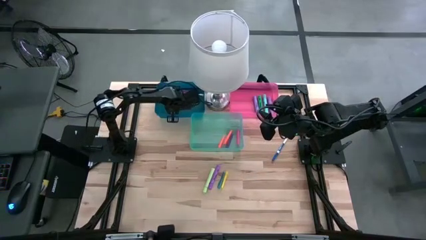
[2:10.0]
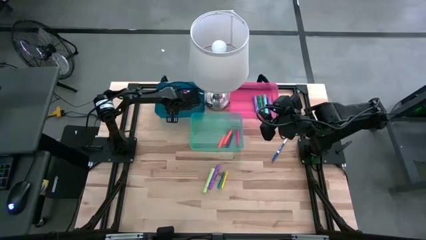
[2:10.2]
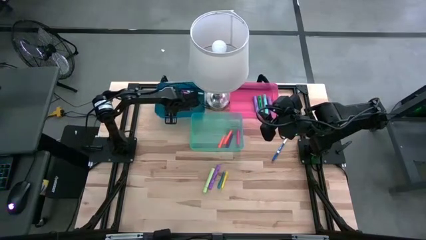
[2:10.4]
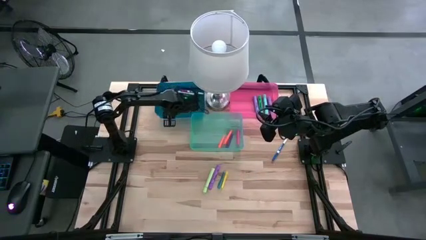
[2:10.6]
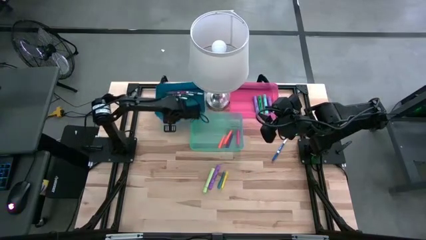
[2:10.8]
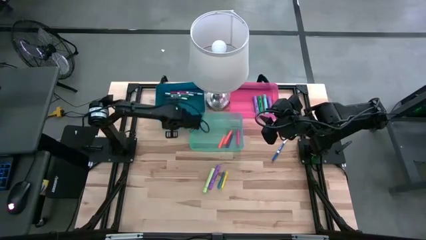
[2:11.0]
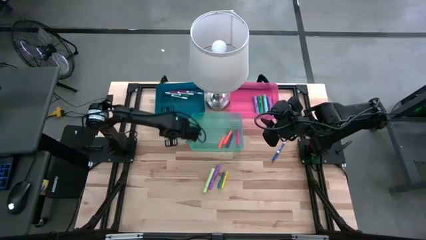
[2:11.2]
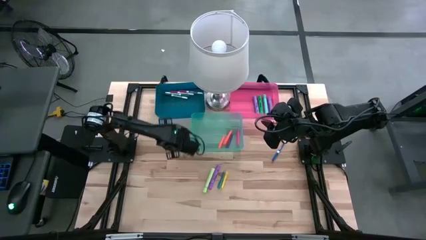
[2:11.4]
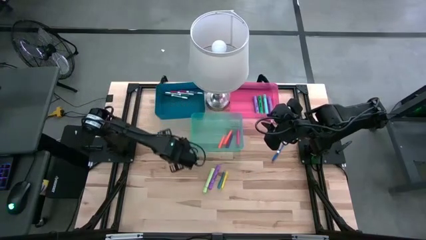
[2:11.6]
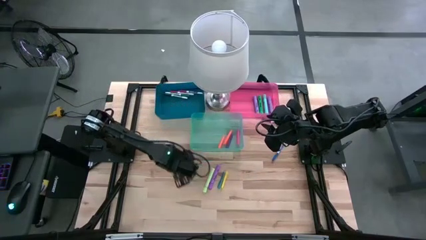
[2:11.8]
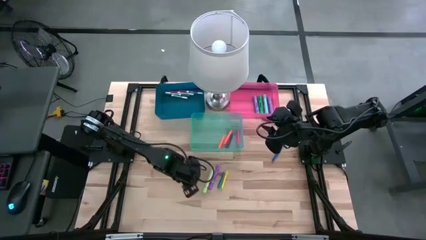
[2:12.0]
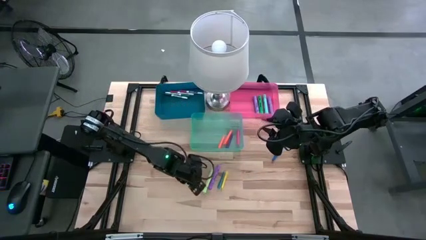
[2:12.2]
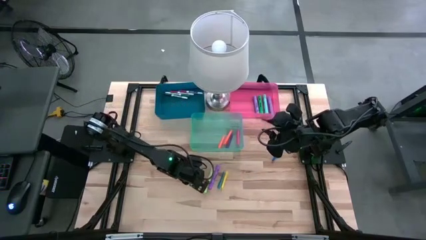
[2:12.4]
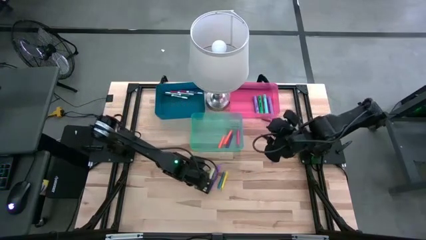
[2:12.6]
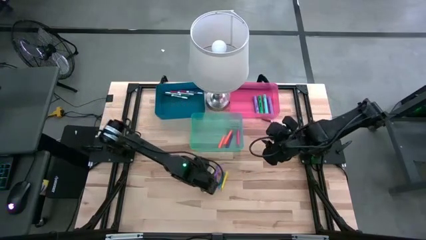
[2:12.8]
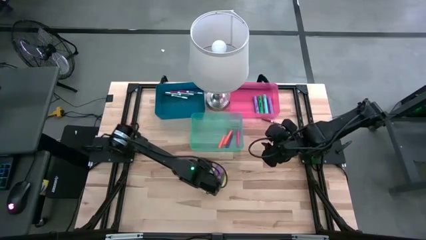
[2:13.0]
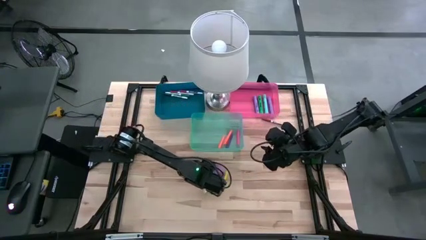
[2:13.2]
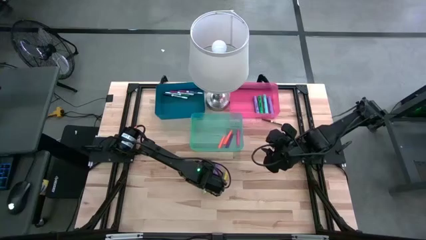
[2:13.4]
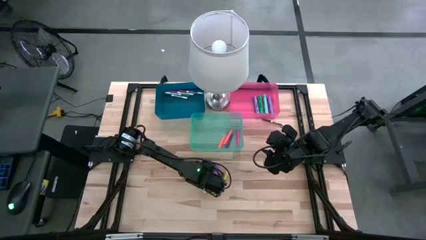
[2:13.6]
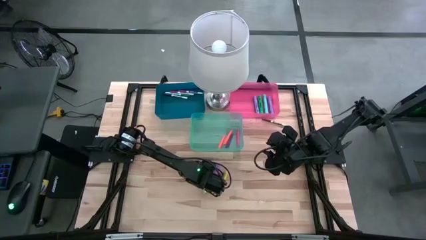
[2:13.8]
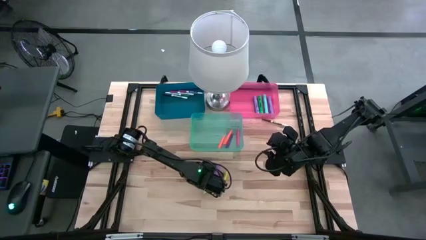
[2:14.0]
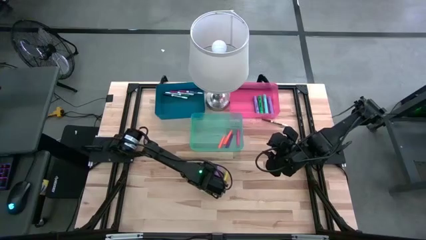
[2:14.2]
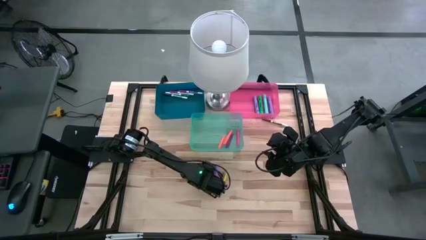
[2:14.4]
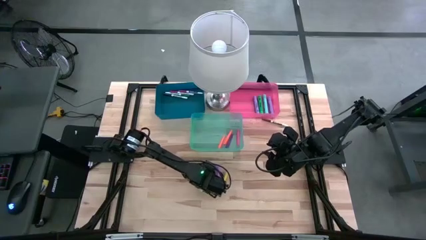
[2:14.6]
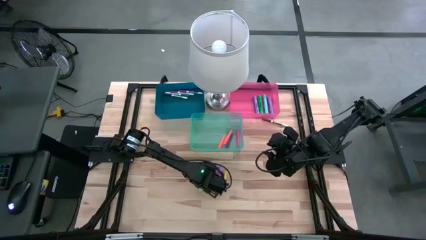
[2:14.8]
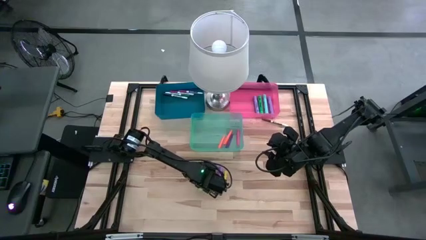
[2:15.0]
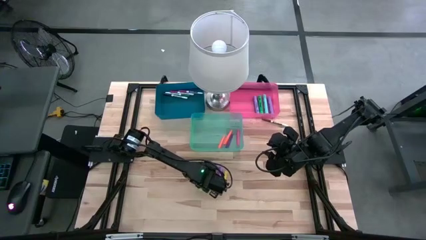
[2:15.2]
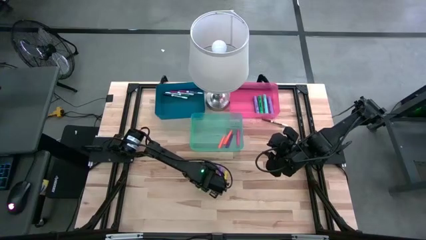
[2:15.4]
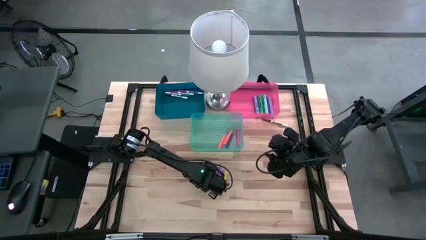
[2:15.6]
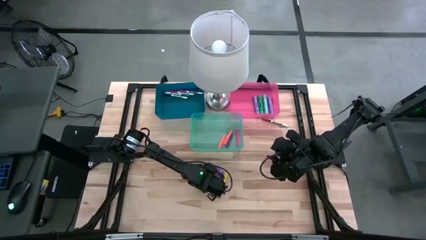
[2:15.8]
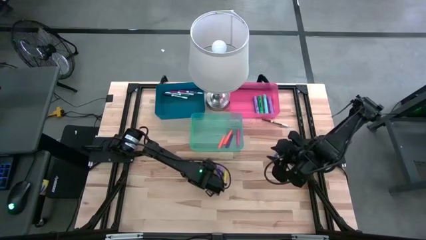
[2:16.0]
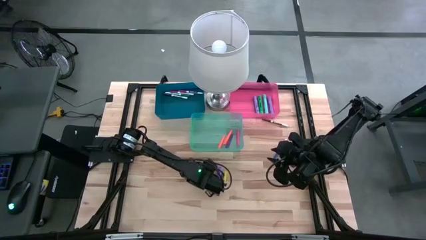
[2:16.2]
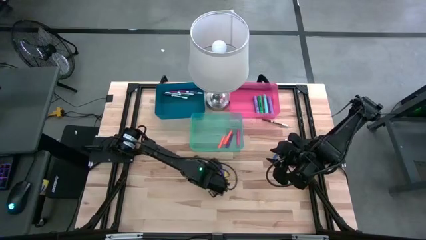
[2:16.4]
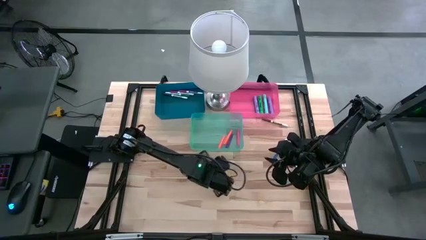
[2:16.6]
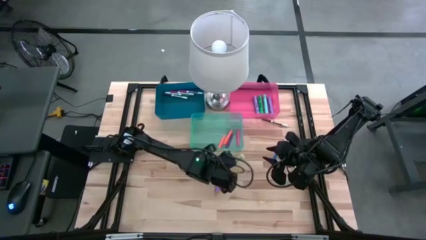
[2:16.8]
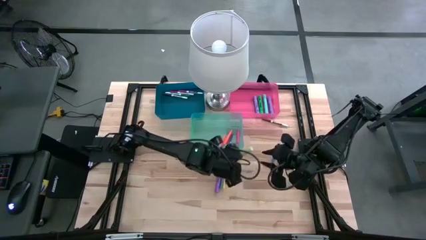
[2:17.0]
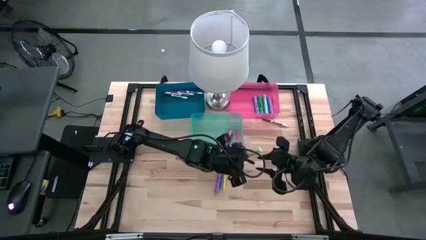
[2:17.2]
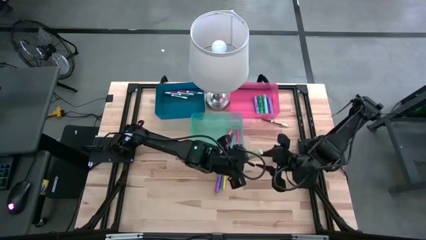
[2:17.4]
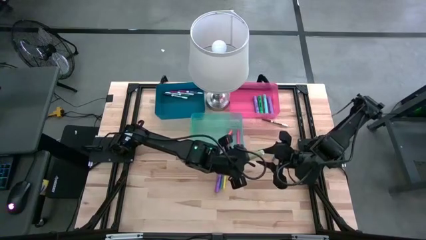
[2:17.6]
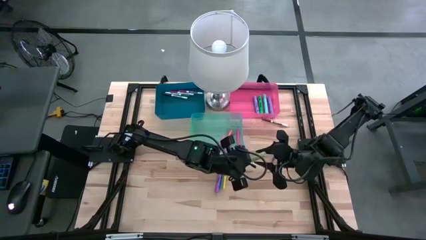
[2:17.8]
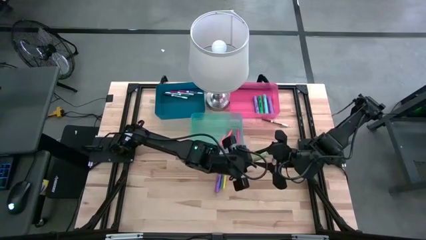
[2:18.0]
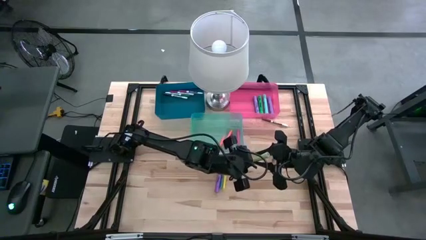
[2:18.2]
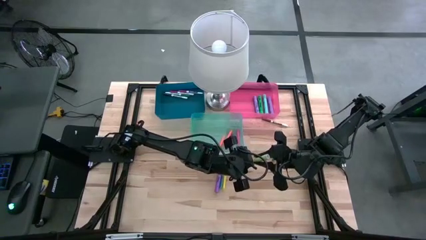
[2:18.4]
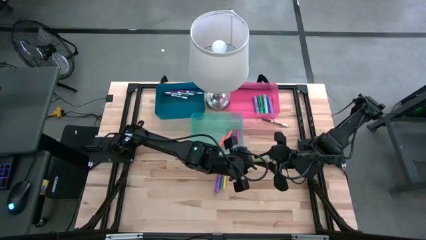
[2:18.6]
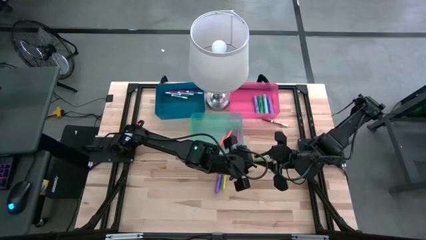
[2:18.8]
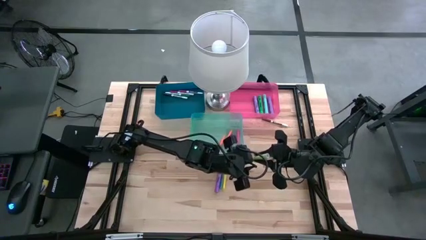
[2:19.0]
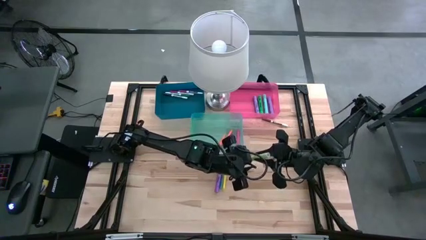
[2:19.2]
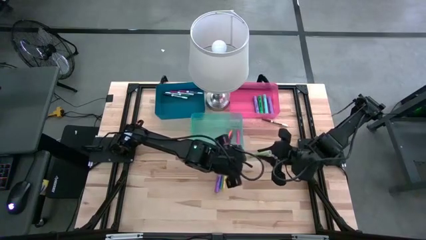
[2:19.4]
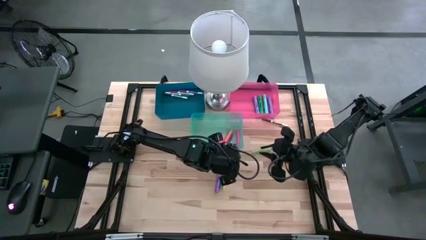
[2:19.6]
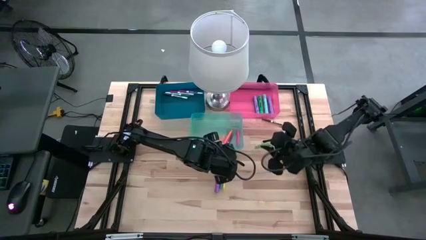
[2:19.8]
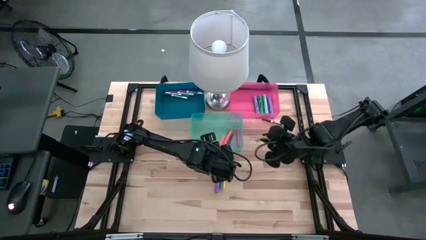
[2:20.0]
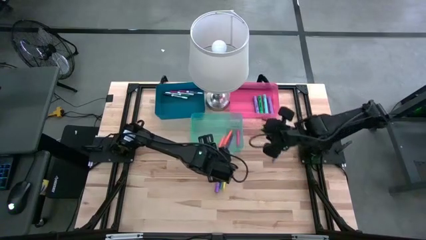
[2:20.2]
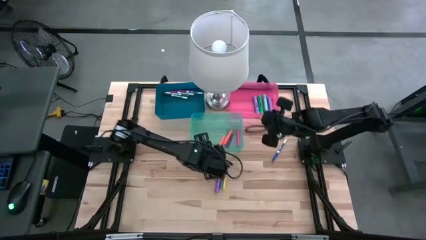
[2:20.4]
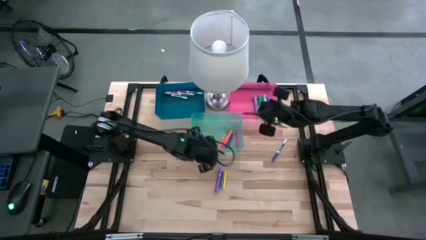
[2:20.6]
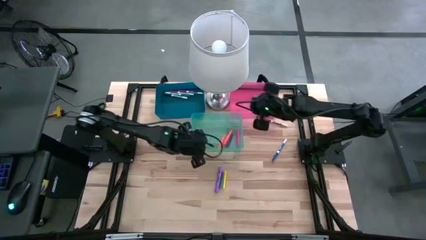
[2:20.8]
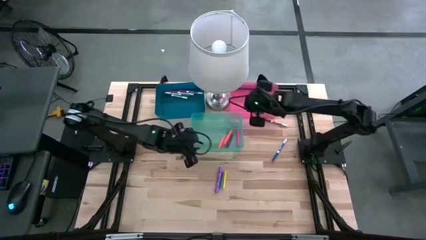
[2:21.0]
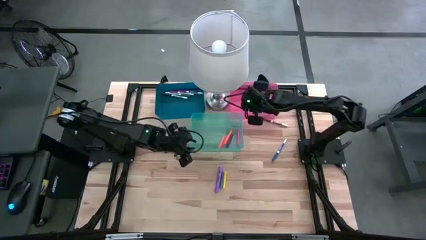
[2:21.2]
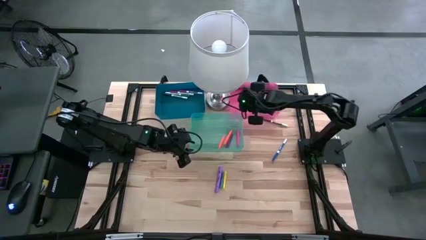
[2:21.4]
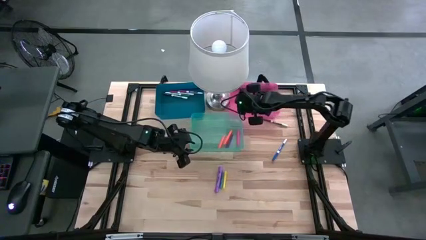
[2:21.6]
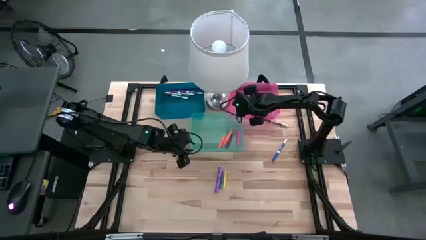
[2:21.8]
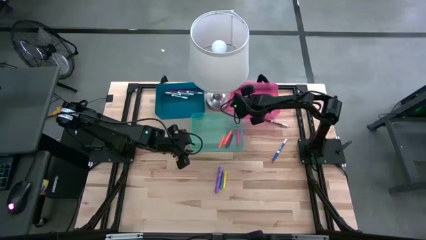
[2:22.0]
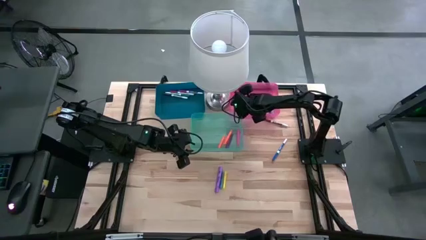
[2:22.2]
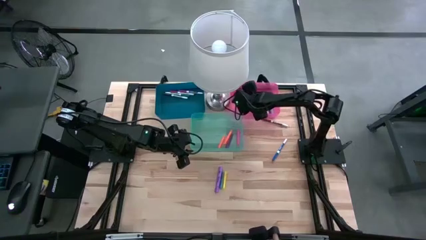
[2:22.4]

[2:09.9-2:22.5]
Task: Pick & Place Markers
Put the light green highlighter pen into the red bin

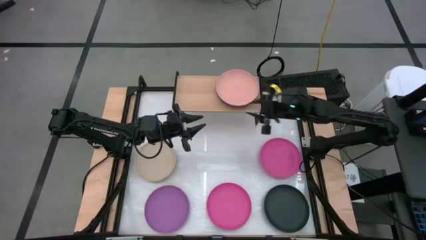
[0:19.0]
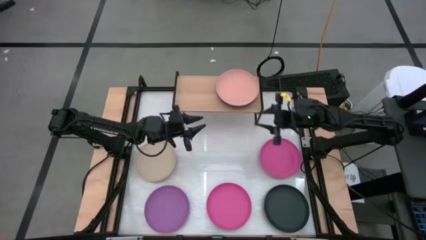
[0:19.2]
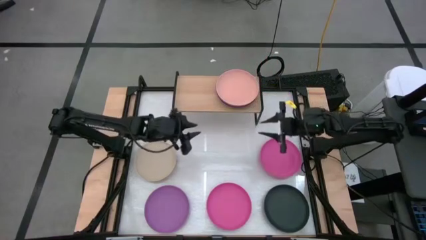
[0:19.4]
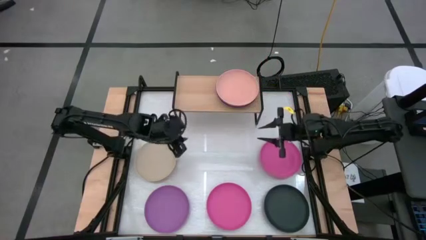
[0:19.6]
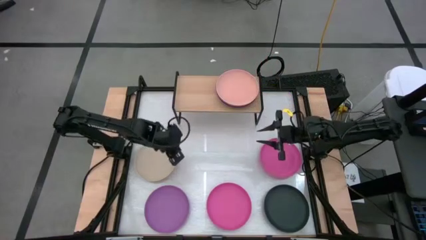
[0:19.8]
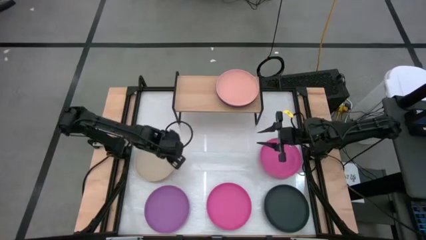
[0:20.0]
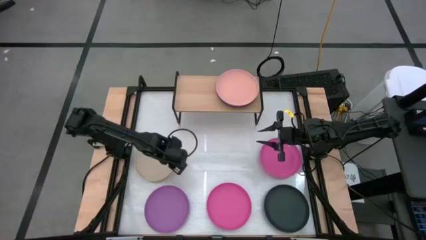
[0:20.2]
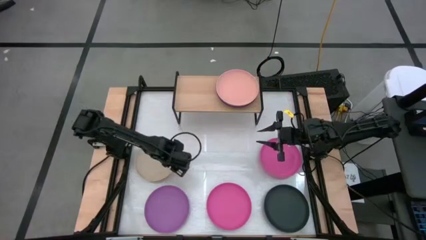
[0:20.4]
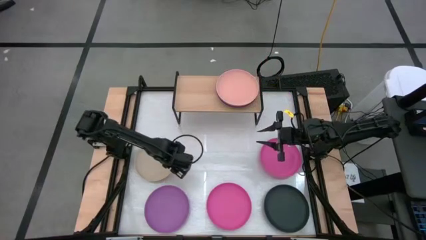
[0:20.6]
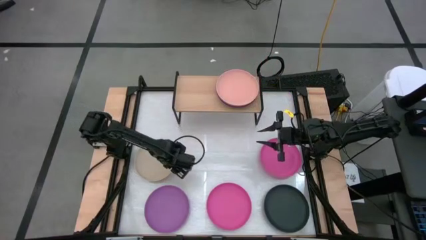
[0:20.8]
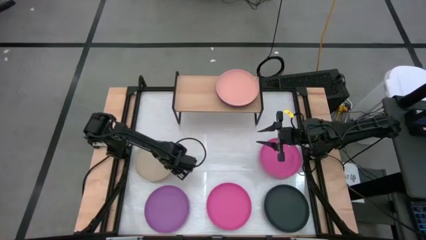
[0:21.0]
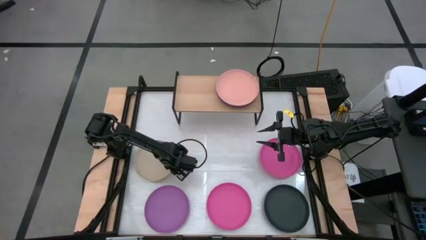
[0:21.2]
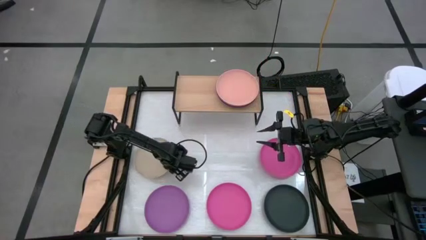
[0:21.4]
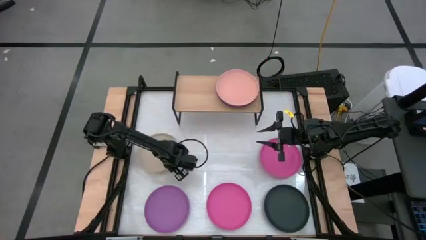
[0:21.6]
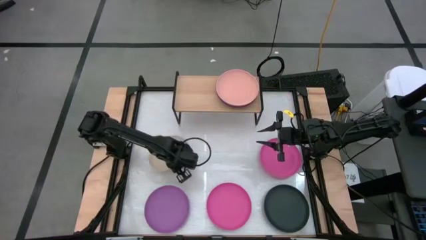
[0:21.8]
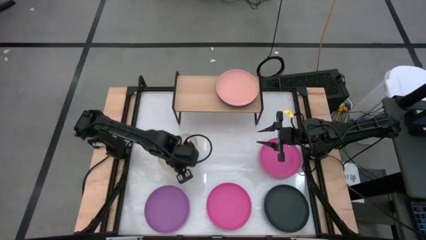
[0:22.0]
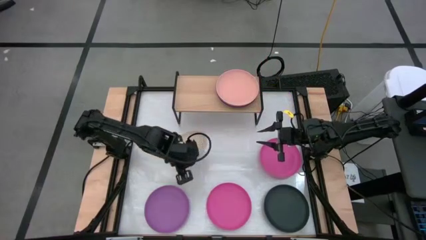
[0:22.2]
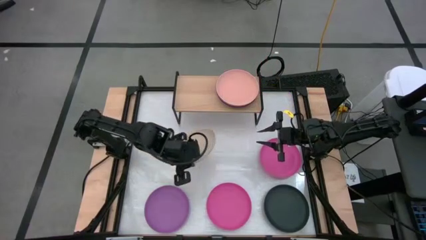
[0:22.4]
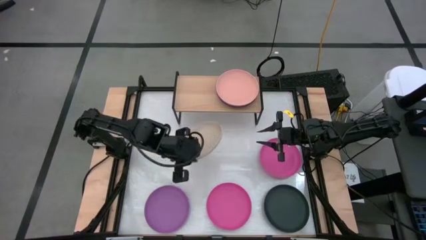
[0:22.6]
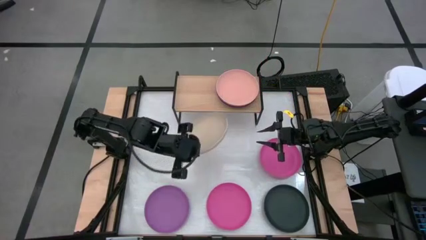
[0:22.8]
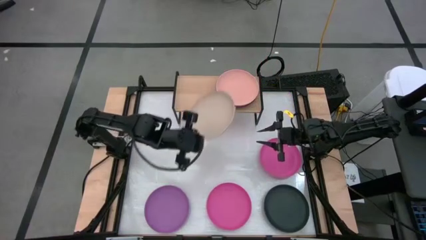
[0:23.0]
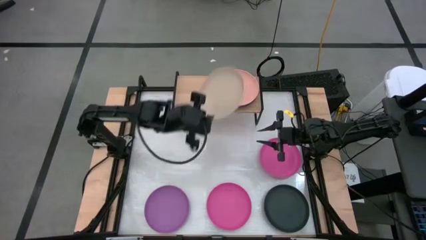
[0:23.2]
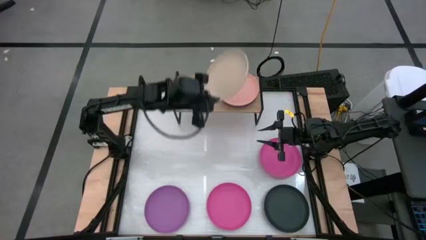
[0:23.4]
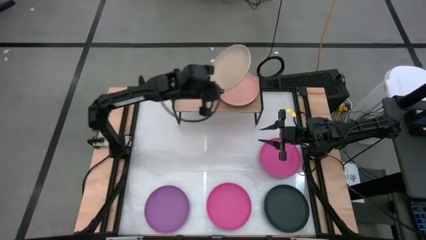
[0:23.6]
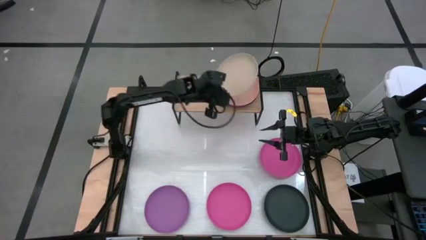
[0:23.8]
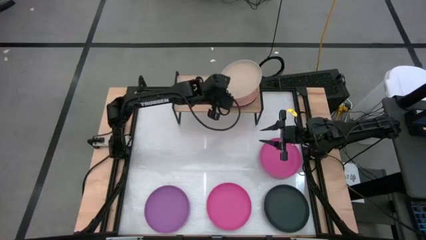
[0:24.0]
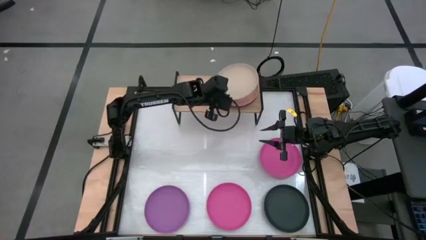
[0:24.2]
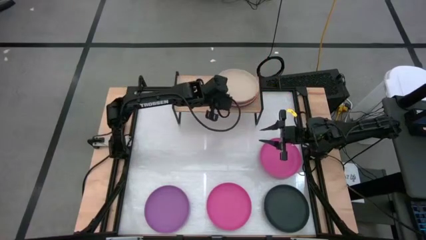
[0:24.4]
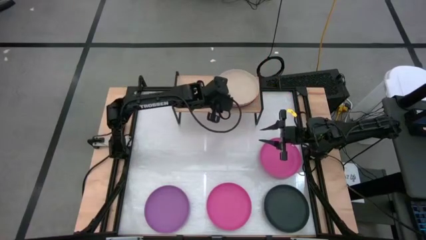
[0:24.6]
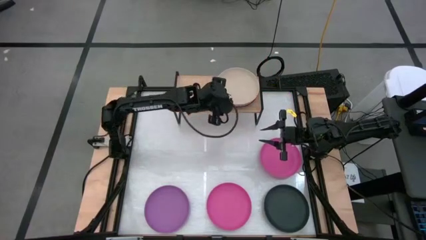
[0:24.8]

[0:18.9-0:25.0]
Task: Place and stack plates onto a shelf
Stack the light brown plate on top of the pink plate on the shelf
